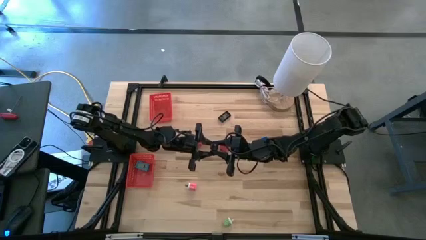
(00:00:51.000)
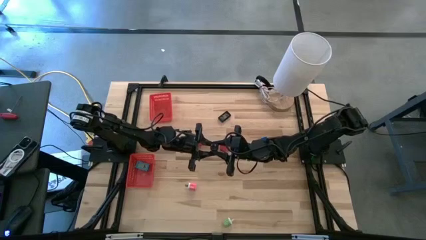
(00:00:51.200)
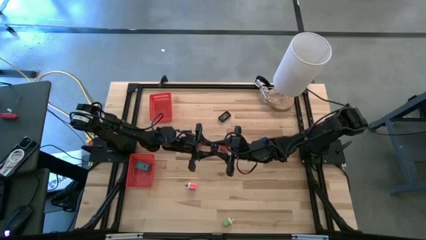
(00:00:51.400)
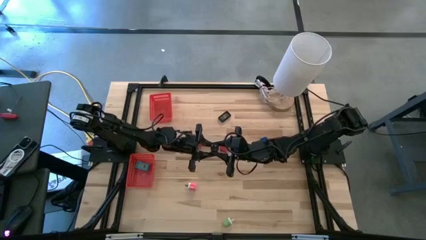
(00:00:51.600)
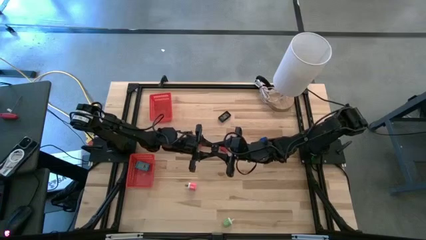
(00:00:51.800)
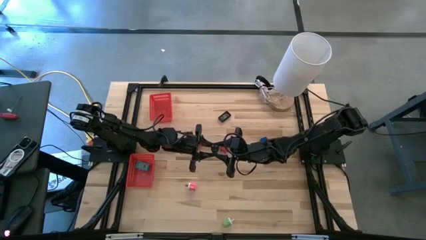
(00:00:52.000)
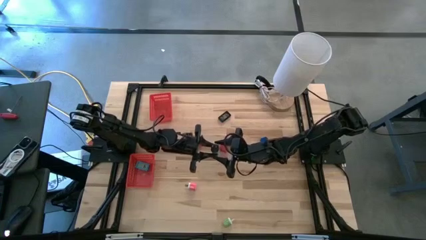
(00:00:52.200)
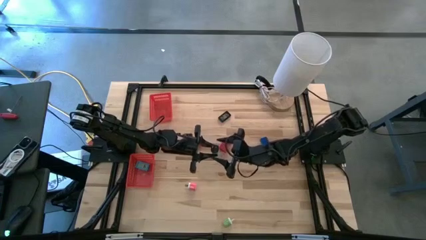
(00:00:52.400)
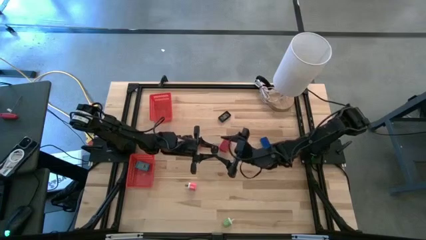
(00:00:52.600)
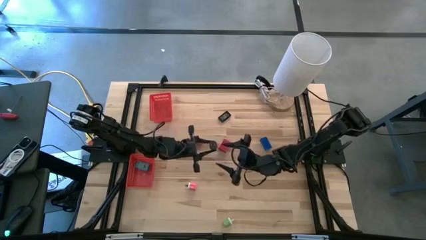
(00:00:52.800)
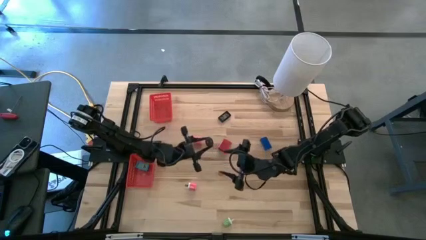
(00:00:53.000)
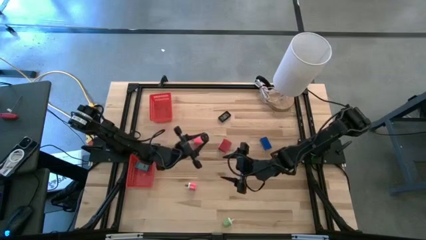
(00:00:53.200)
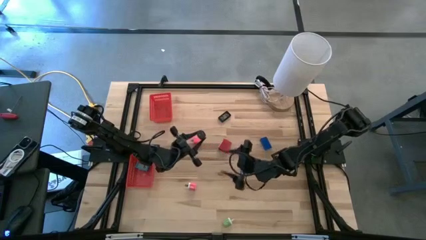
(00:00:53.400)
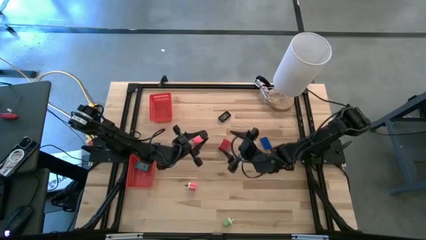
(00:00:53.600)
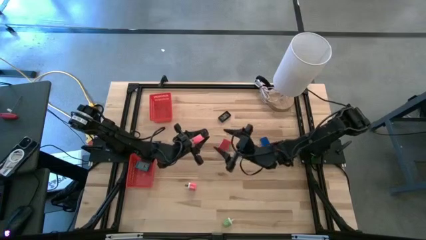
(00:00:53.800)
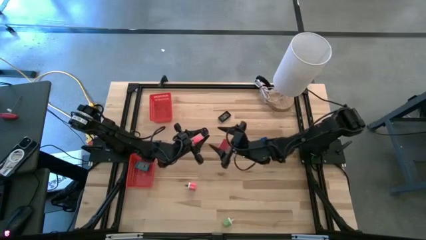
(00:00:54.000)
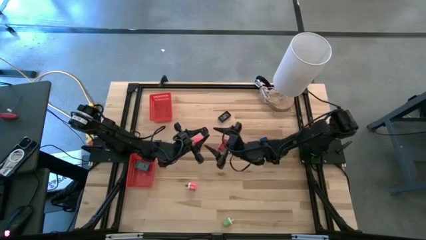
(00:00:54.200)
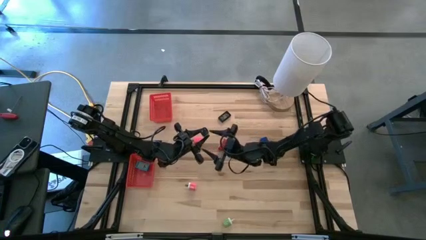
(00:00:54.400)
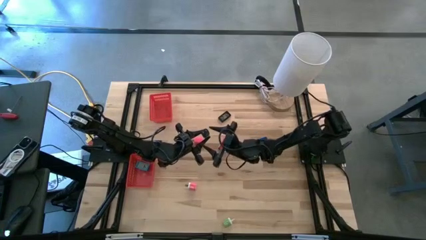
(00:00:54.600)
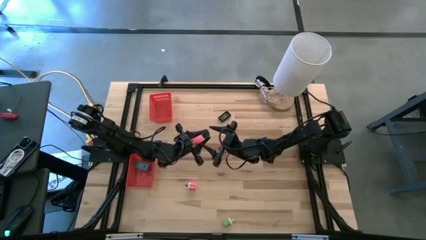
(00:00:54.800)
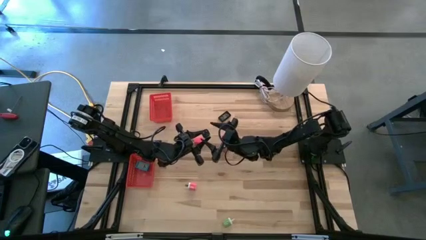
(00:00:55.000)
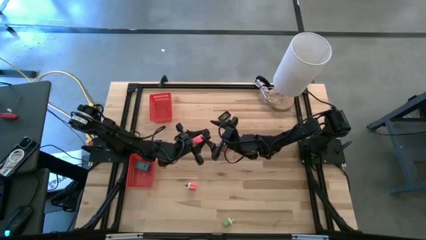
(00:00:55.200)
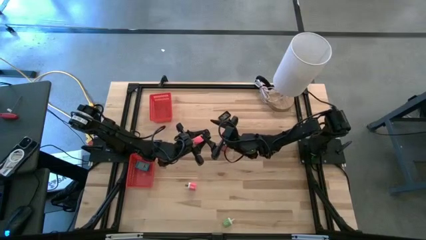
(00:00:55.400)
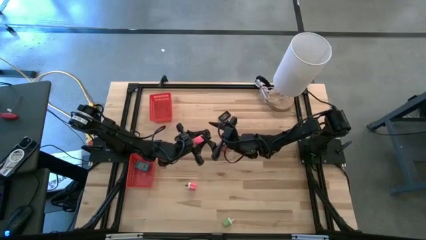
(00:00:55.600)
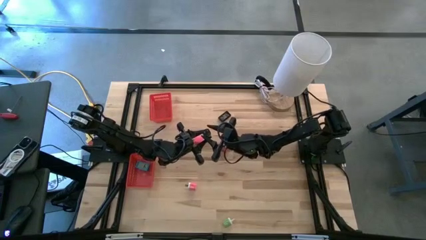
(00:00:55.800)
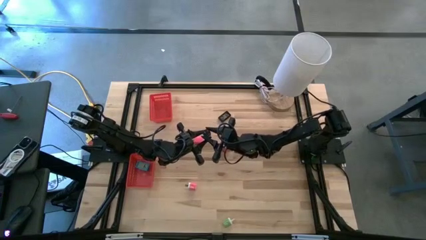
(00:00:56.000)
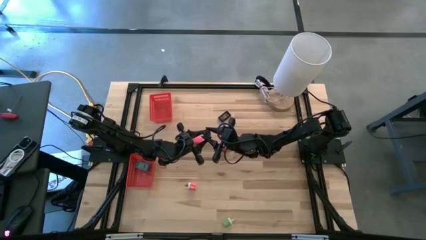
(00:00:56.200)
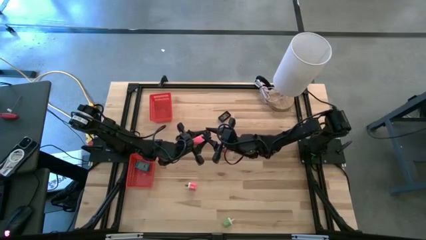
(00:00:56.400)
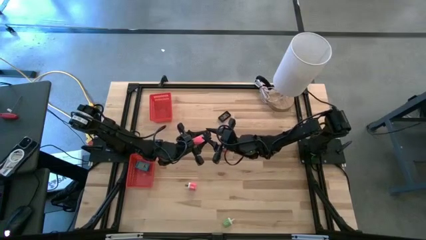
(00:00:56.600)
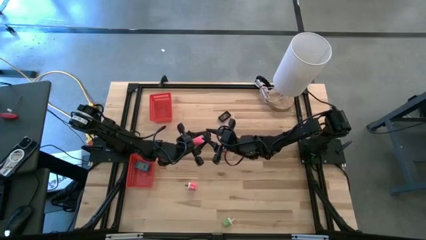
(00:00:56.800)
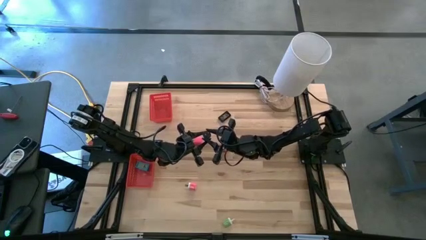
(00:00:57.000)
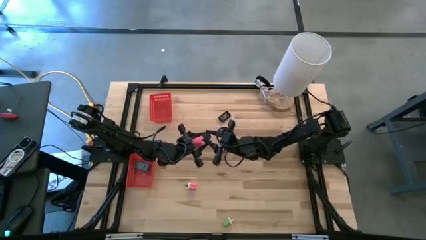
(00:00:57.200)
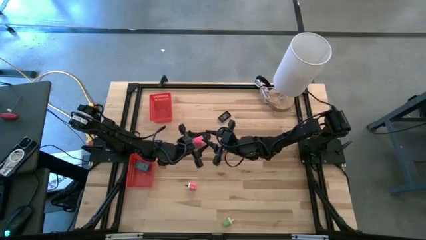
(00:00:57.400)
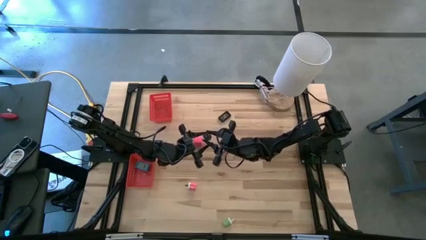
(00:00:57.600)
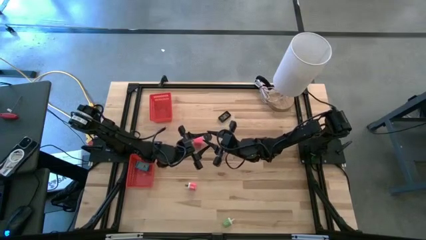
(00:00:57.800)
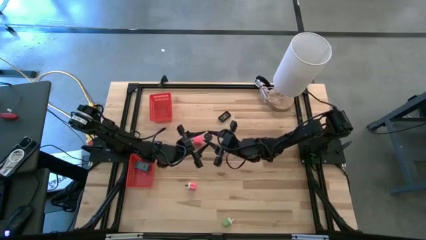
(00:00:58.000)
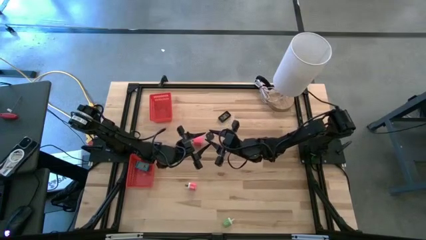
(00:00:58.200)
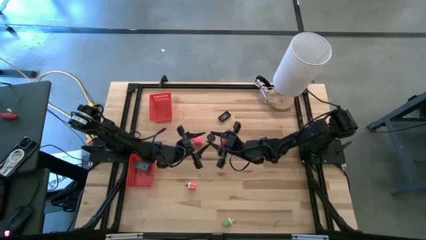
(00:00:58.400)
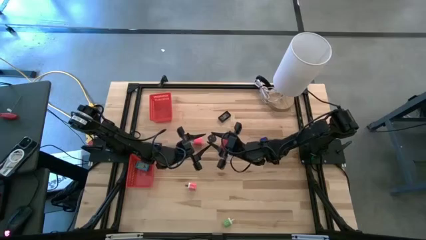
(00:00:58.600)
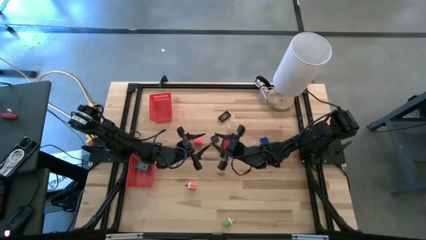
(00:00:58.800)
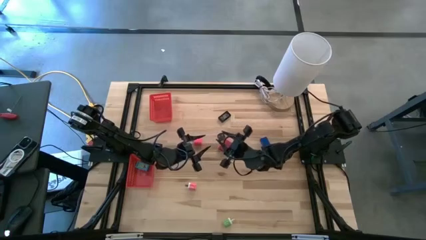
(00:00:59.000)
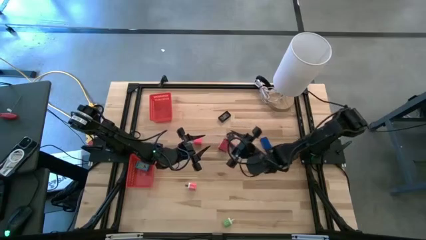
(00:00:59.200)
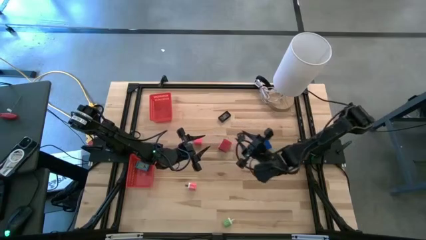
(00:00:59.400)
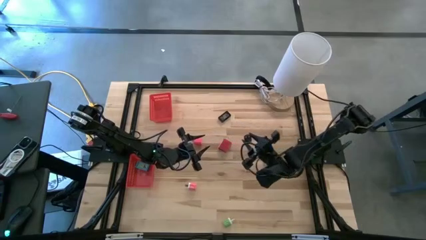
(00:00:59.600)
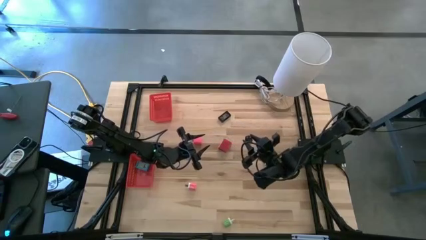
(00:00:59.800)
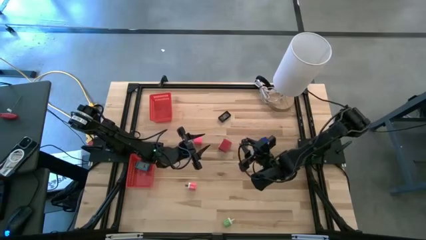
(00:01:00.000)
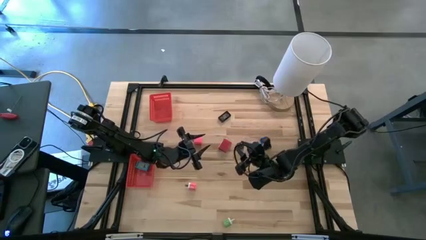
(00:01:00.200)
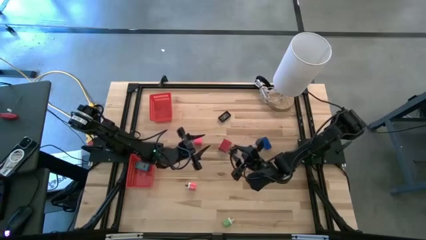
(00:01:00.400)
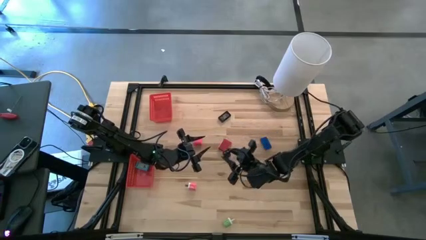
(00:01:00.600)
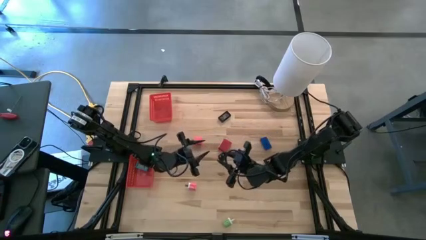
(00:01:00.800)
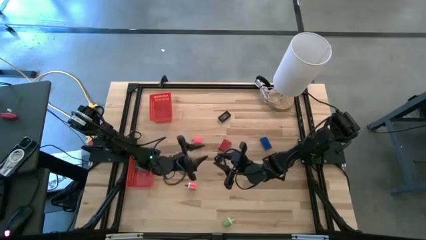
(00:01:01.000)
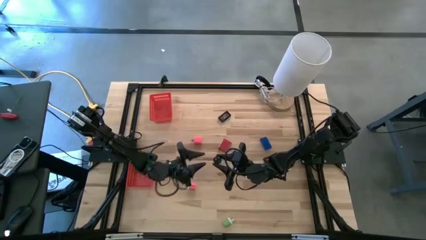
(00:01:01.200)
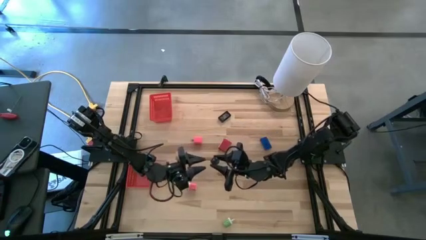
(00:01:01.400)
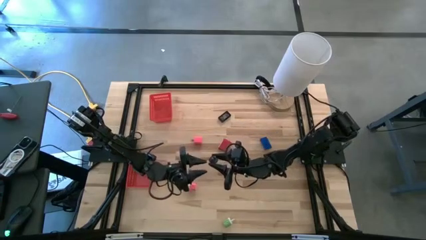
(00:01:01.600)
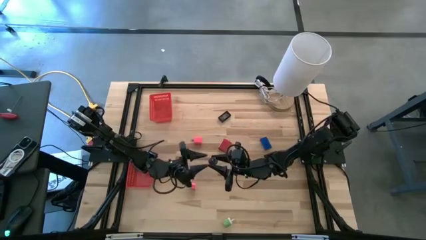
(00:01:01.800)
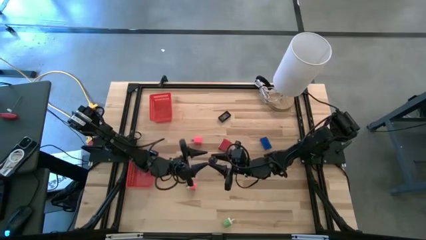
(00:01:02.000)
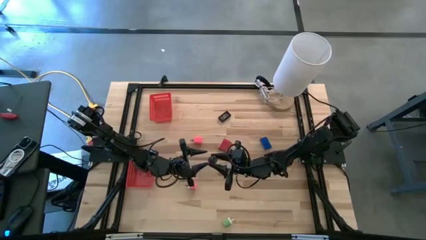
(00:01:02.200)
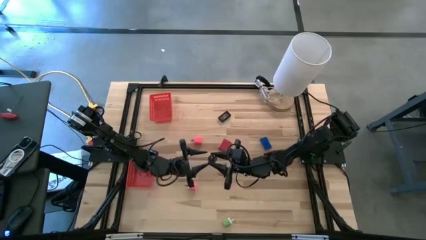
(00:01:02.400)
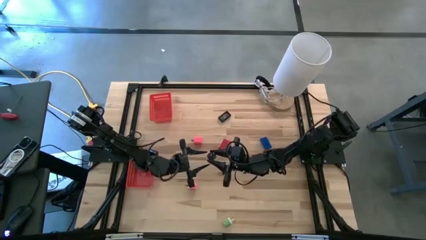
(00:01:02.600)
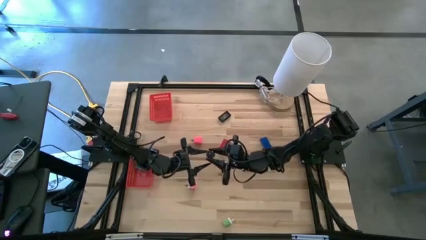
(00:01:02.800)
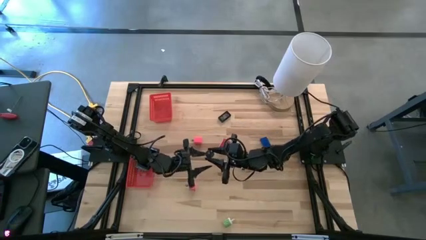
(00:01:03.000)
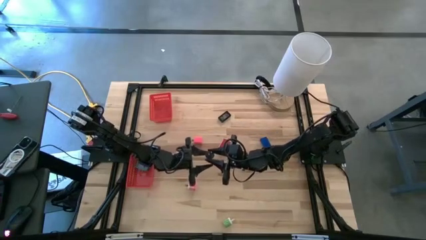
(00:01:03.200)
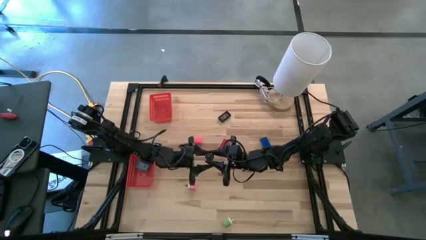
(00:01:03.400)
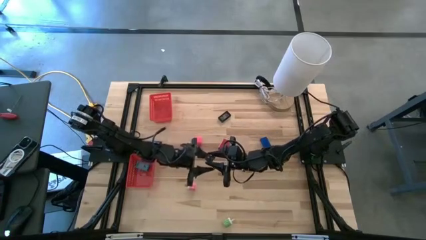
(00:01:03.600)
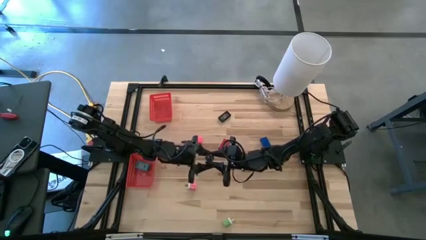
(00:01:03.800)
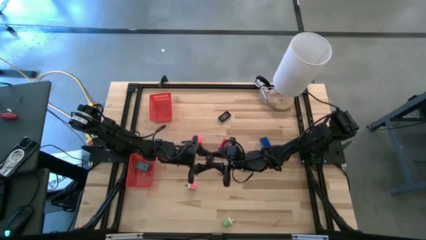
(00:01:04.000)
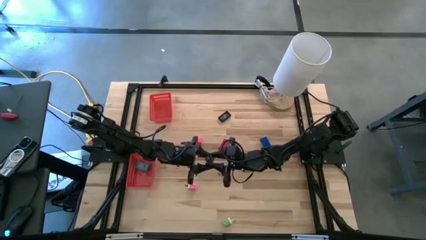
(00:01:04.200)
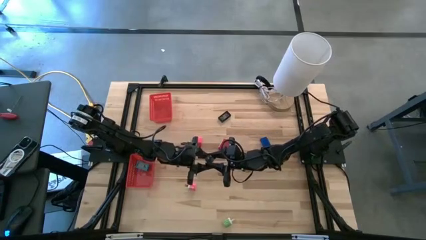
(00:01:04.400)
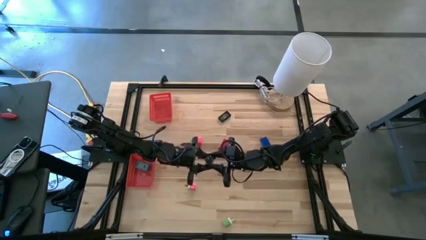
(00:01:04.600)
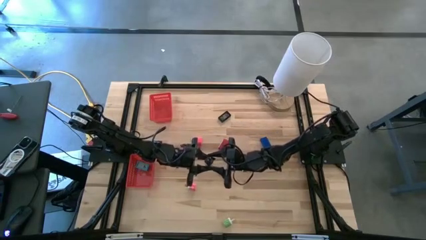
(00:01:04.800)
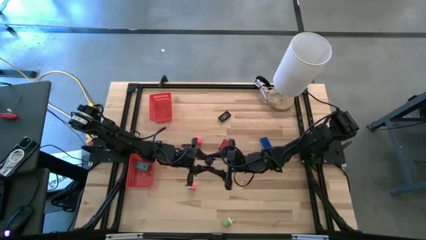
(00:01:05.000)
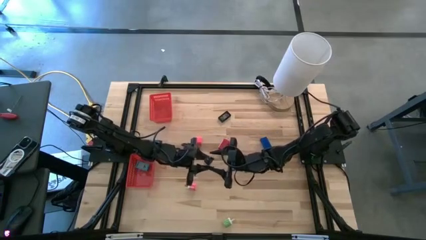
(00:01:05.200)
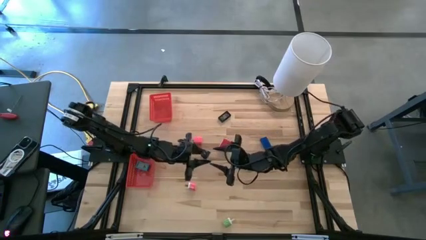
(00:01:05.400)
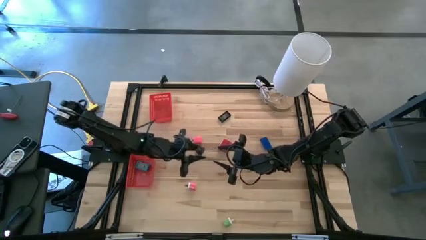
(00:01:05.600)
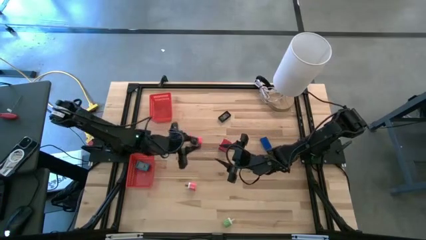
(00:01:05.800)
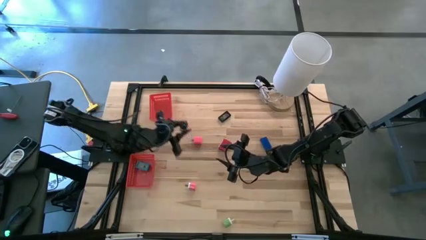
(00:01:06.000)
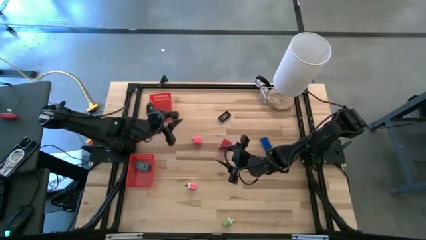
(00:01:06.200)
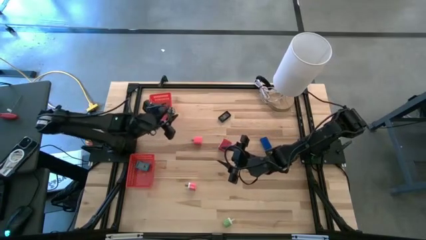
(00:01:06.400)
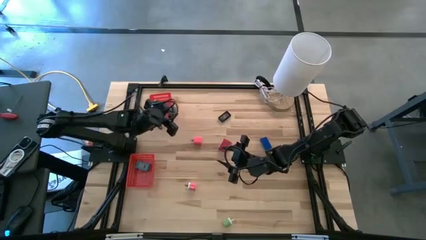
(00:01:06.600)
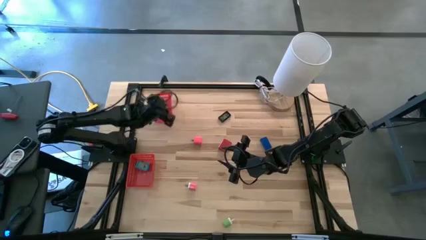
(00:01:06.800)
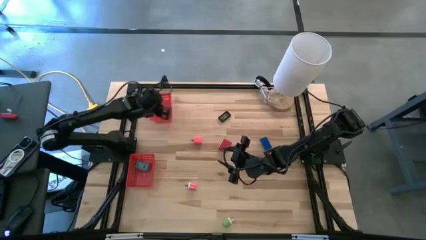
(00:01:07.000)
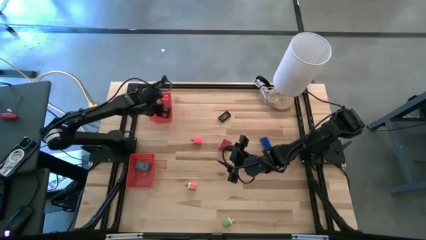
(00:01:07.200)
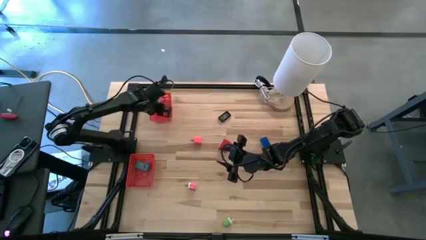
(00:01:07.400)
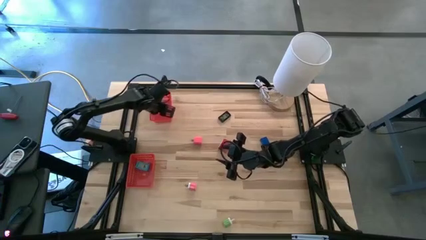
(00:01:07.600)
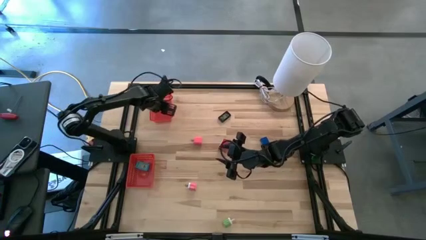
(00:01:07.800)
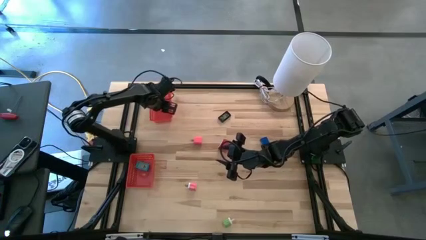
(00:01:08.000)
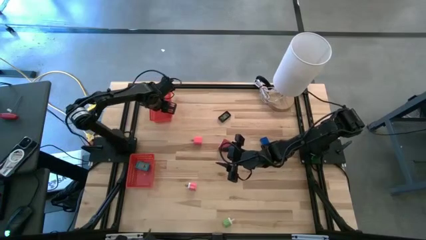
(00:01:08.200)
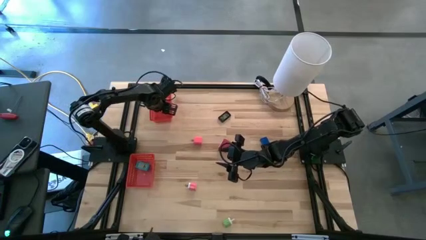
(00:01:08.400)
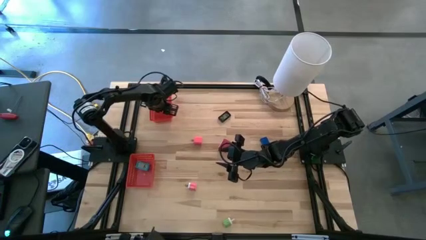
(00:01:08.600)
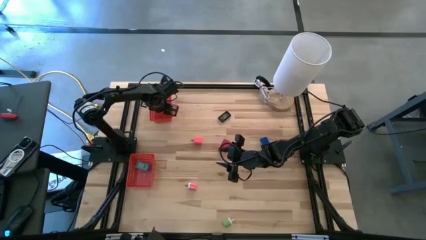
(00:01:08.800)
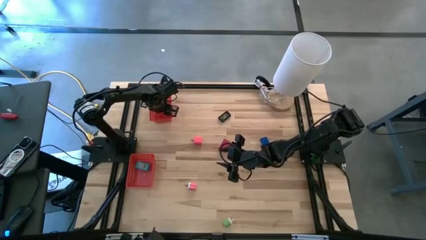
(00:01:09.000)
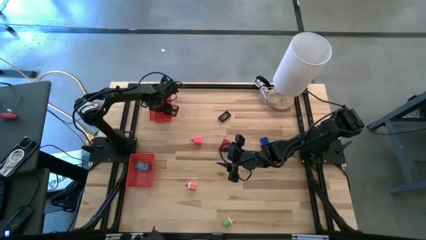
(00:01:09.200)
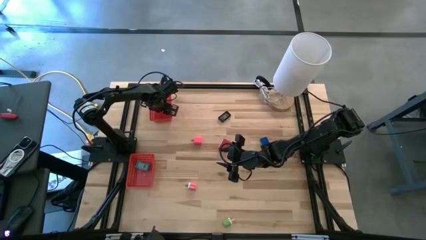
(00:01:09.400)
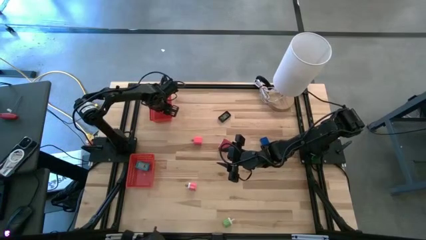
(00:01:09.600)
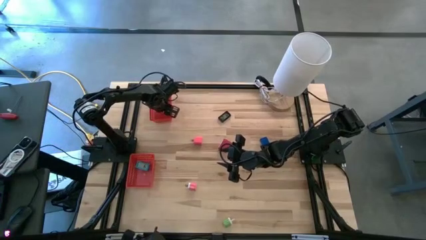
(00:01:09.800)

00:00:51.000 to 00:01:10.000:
Task: Pick & Place Office items
Put the white charger adapter into the top red bin
